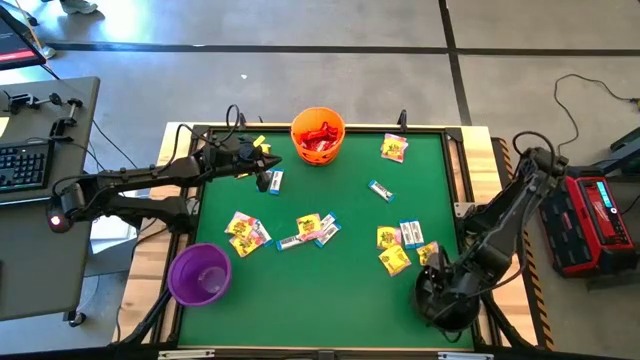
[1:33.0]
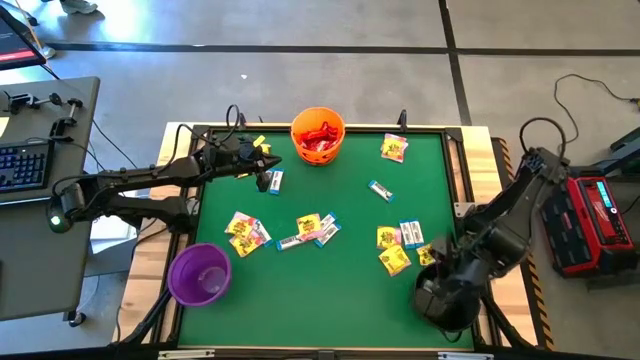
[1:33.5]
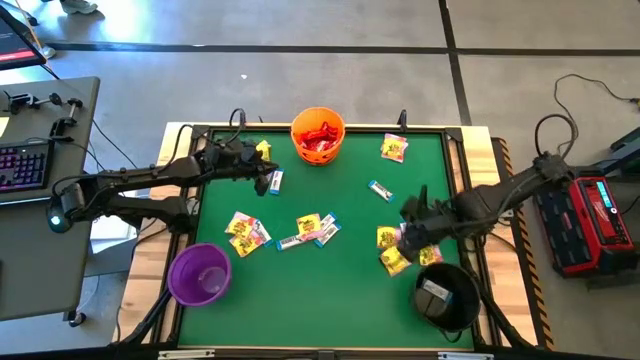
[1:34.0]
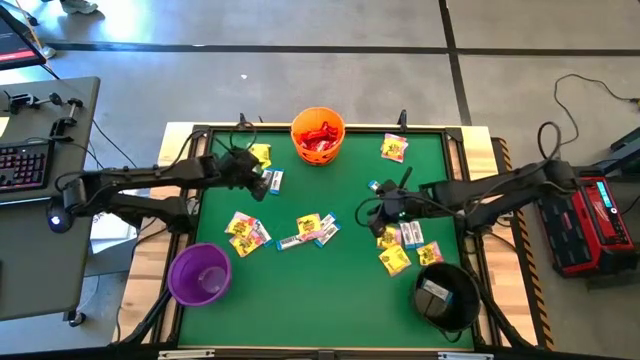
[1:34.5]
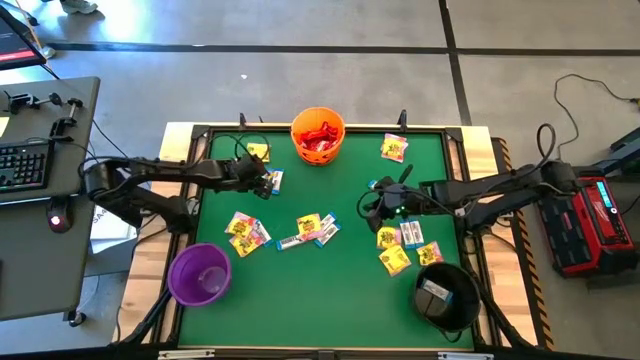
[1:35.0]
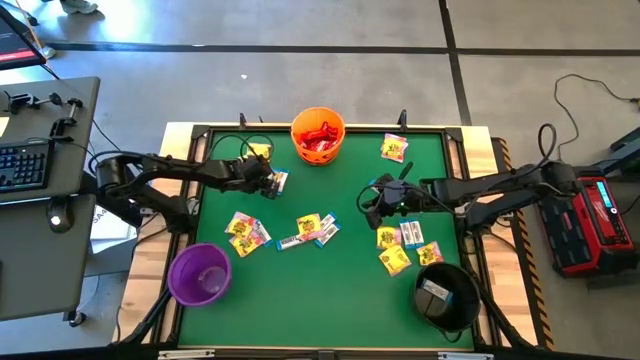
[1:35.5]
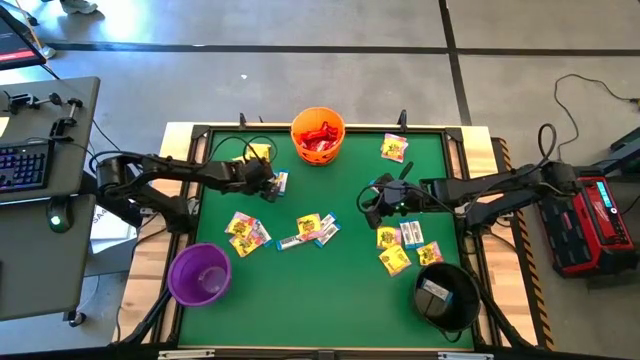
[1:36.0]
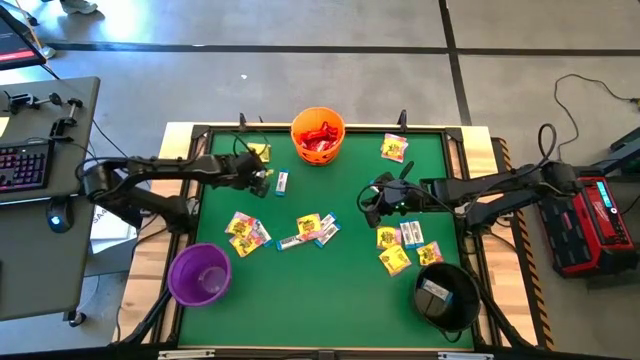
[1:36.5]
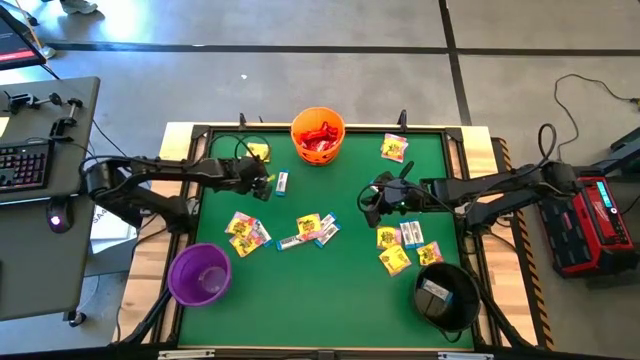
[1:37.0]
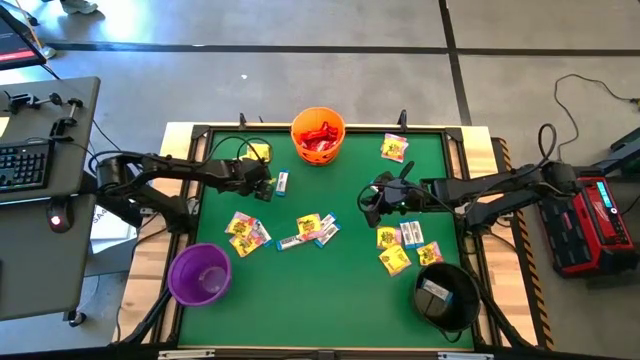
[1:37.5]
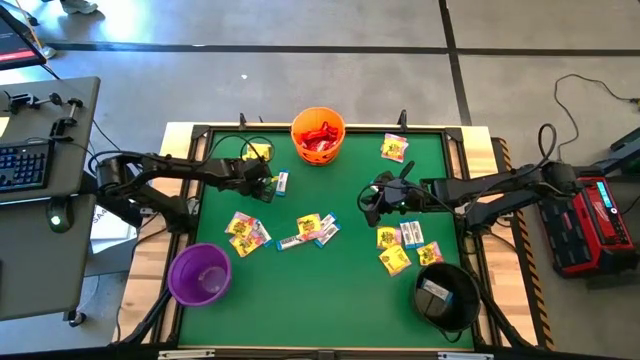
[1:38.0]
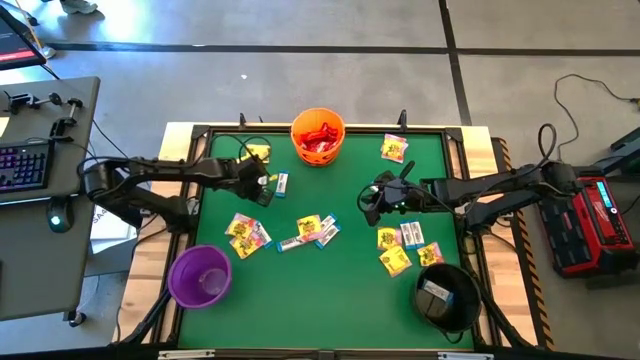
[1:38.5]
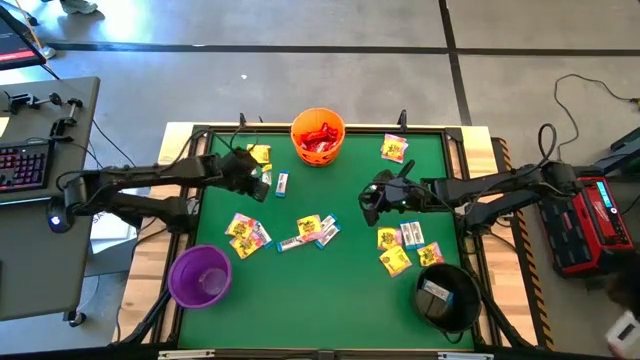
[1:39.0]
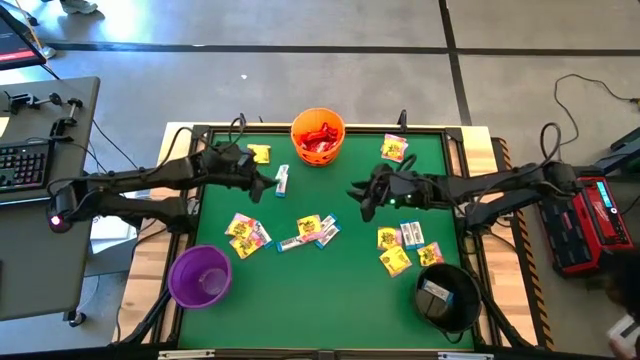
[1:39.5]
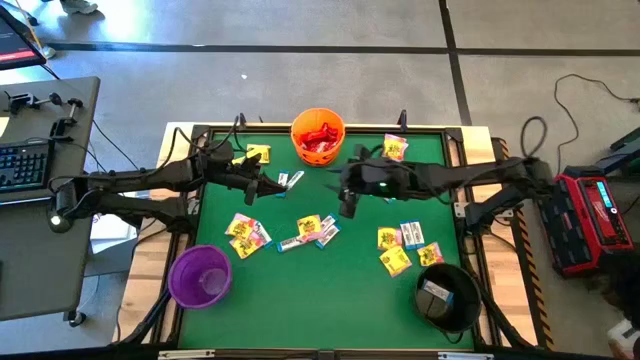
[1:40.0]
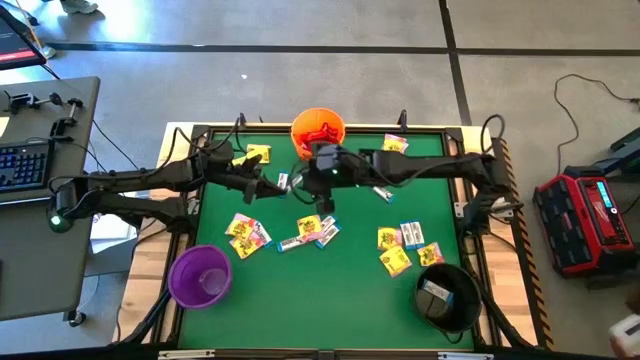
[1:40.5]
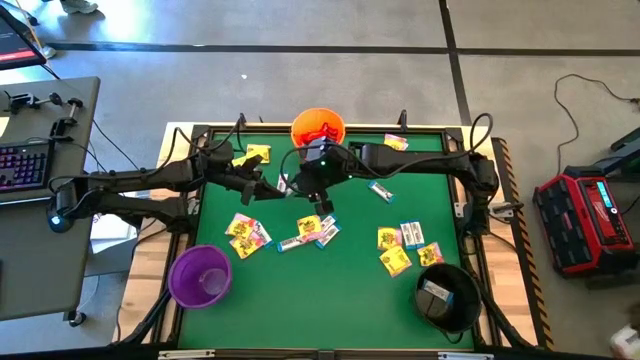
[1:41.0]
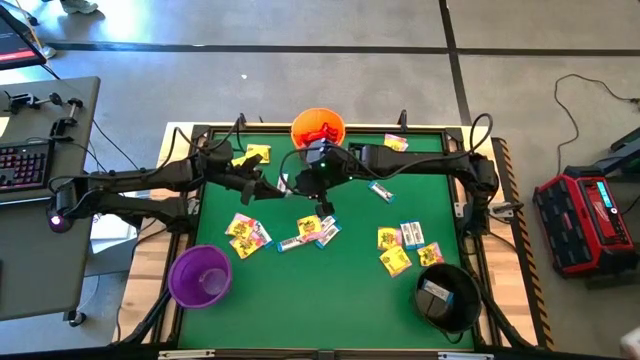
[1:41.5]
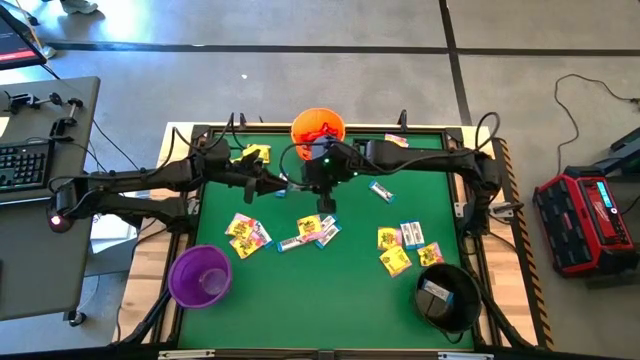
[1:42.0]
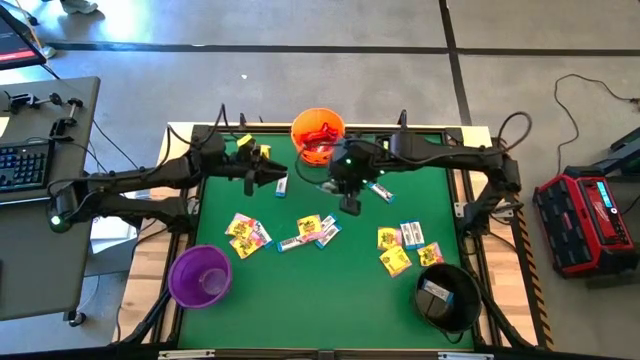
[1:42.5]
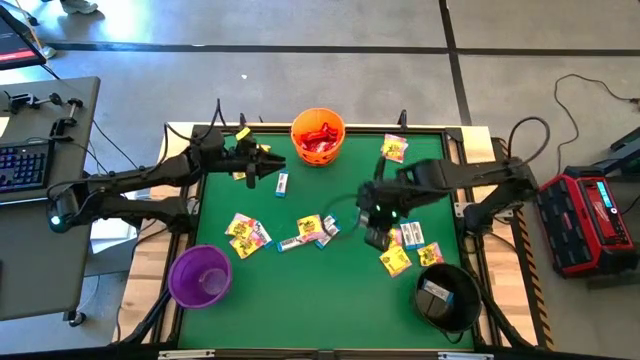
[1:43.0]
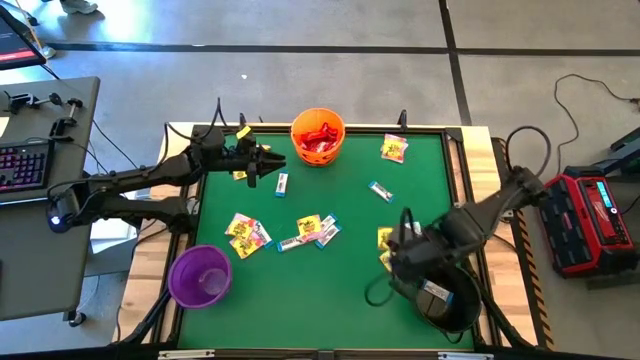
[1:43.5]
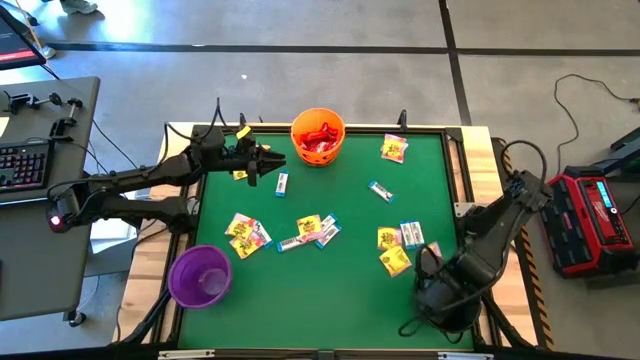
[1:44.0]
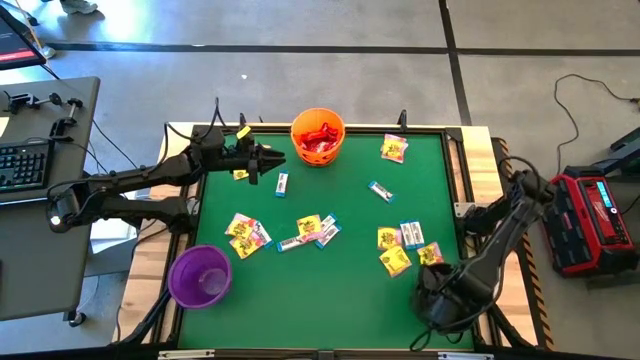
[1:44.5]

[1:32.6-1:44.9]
Task: Sort candy by brand, put in halloween buckets
Put the white chocolate bar into the black bucket

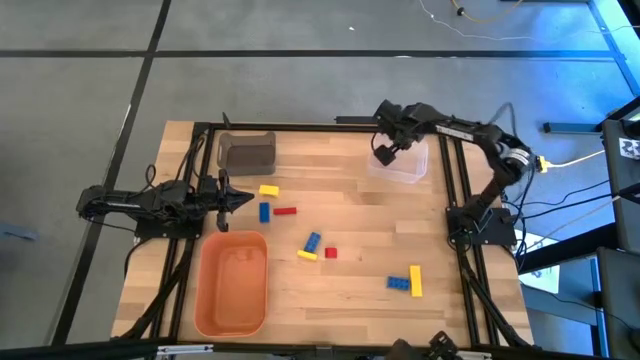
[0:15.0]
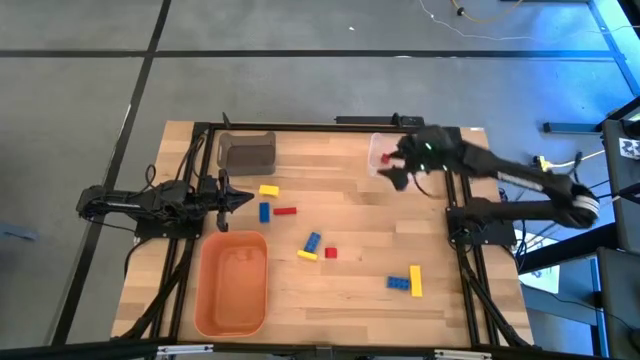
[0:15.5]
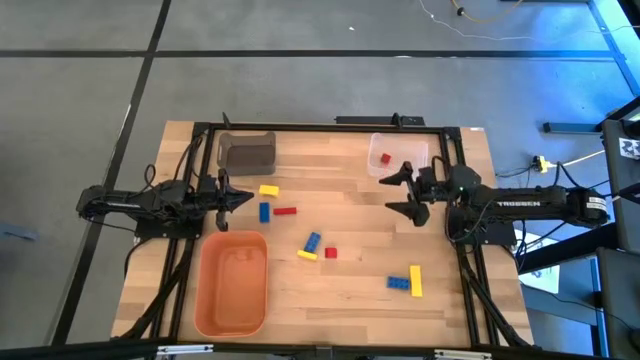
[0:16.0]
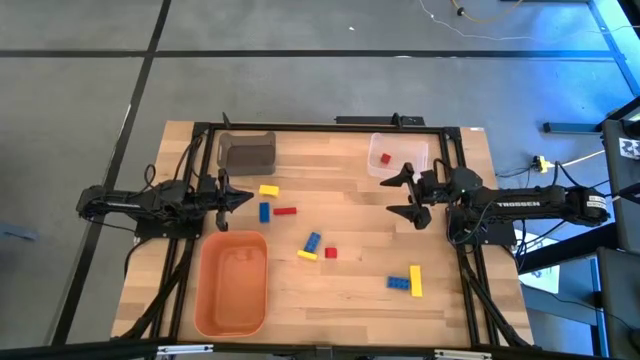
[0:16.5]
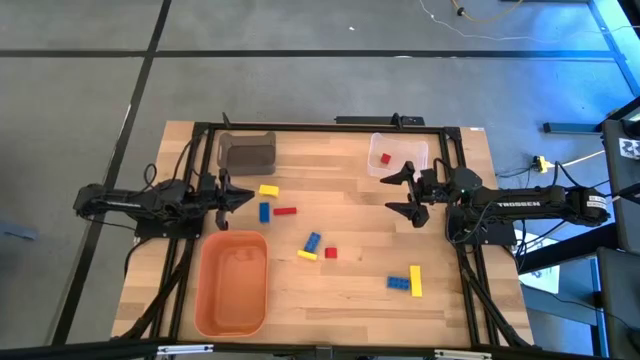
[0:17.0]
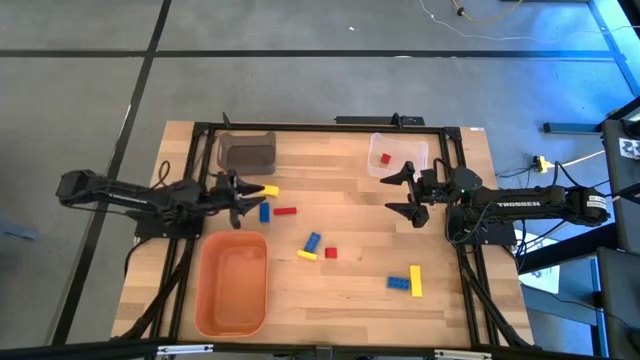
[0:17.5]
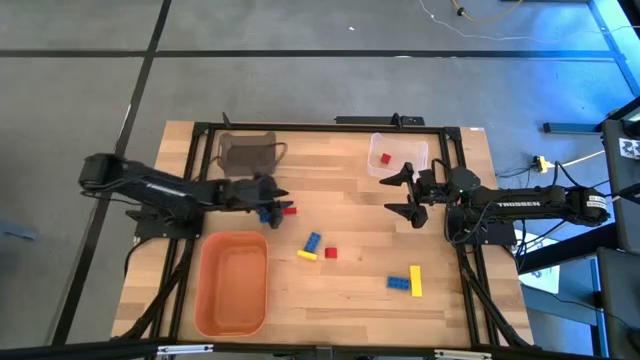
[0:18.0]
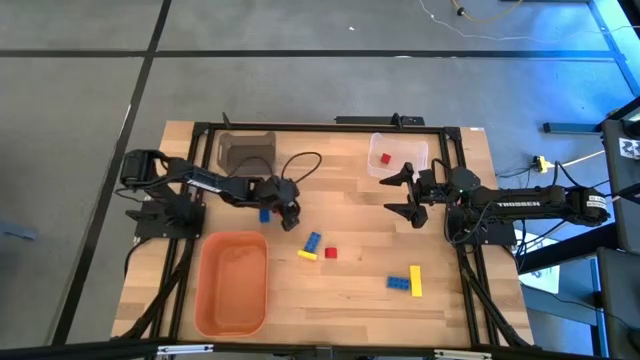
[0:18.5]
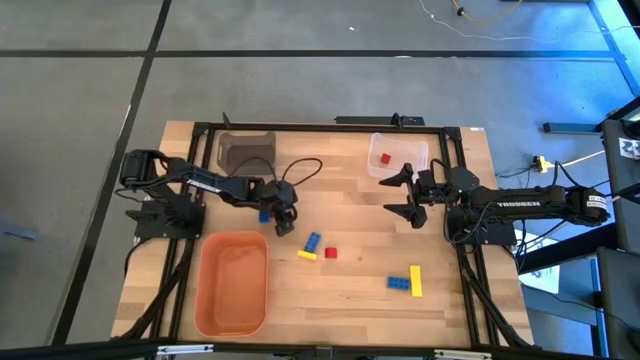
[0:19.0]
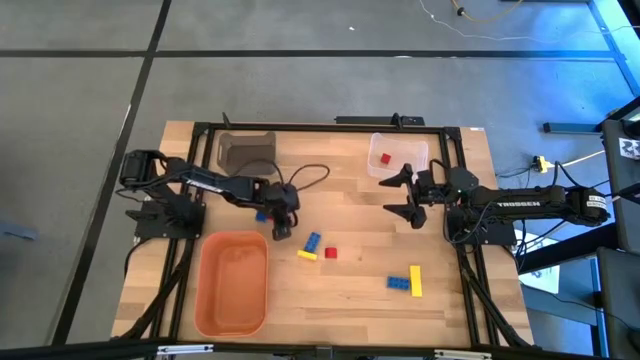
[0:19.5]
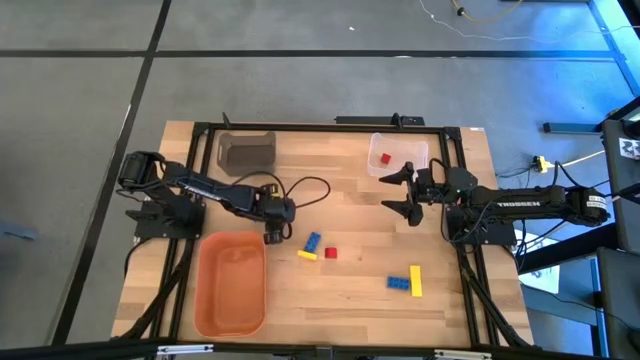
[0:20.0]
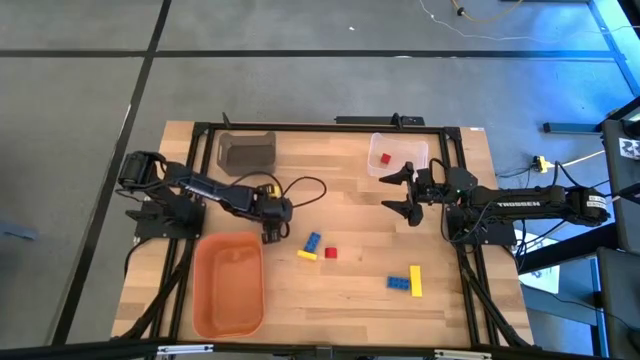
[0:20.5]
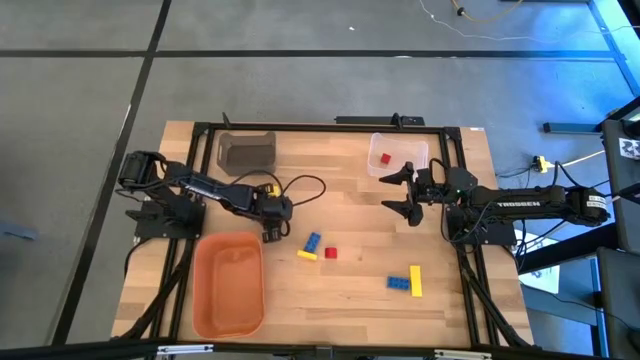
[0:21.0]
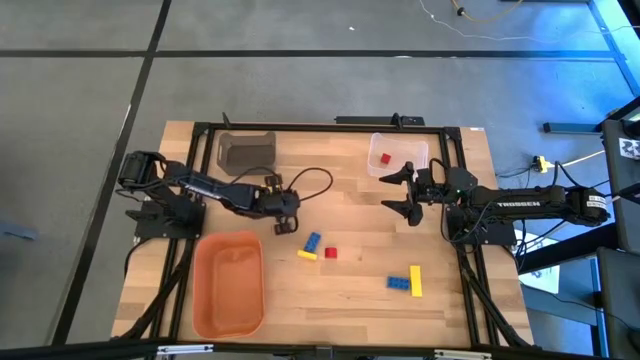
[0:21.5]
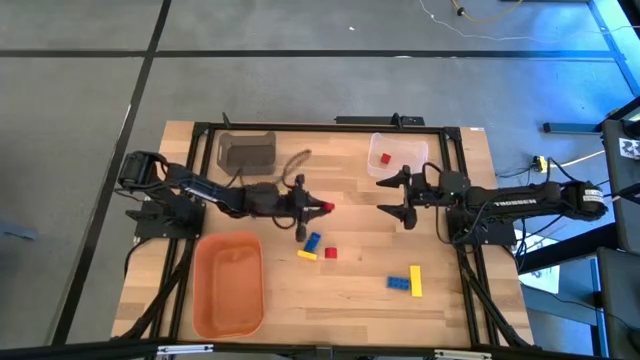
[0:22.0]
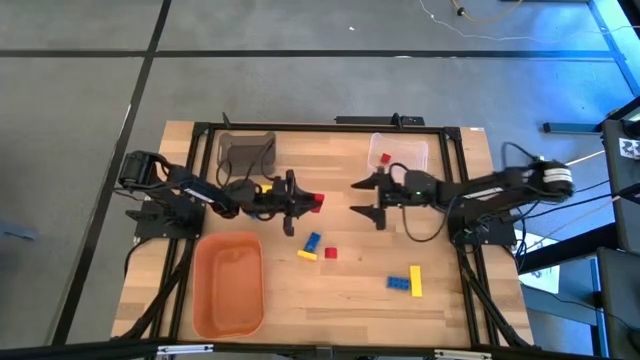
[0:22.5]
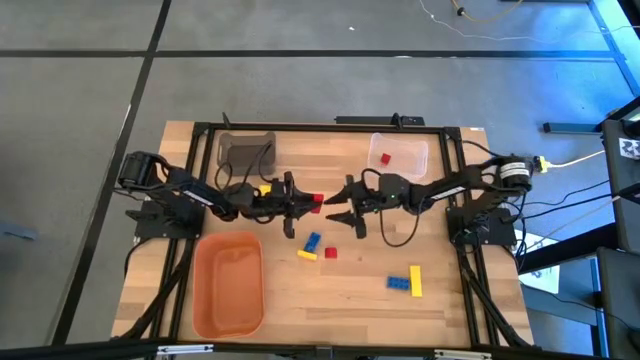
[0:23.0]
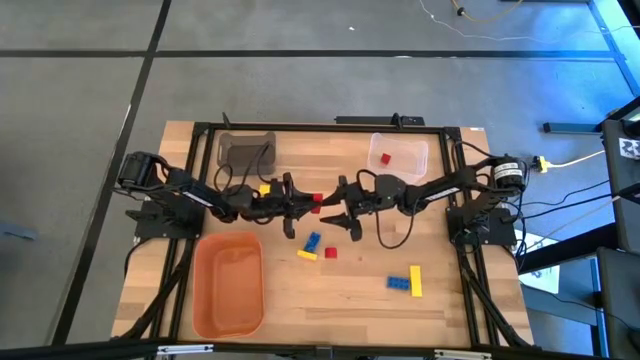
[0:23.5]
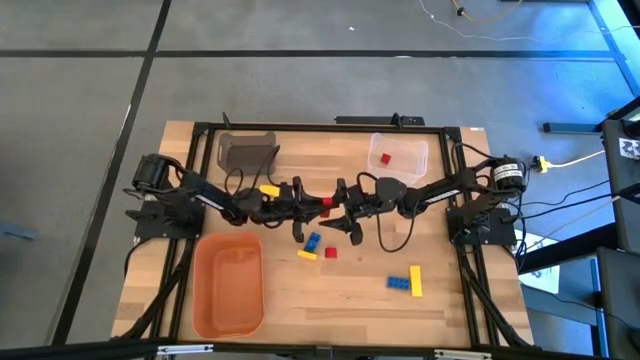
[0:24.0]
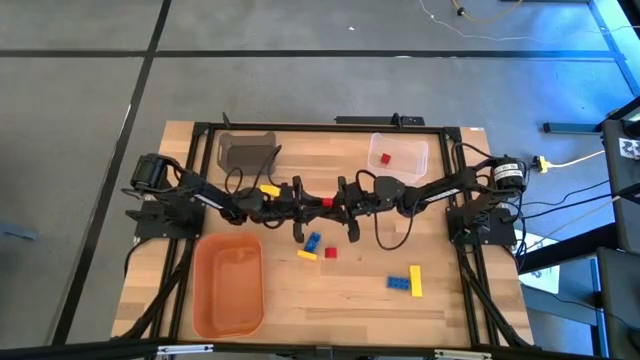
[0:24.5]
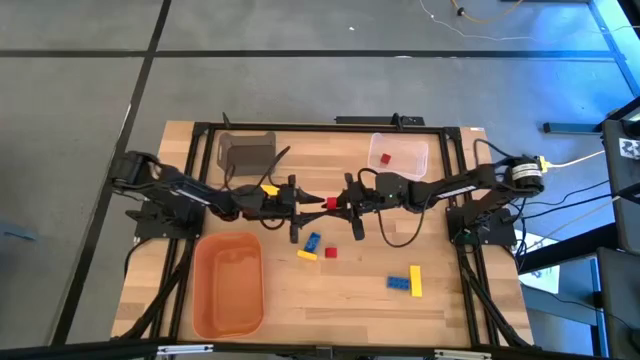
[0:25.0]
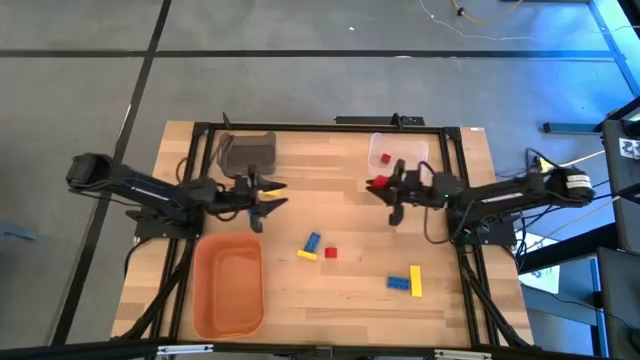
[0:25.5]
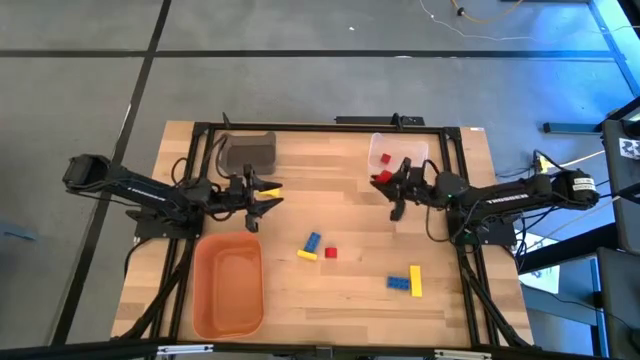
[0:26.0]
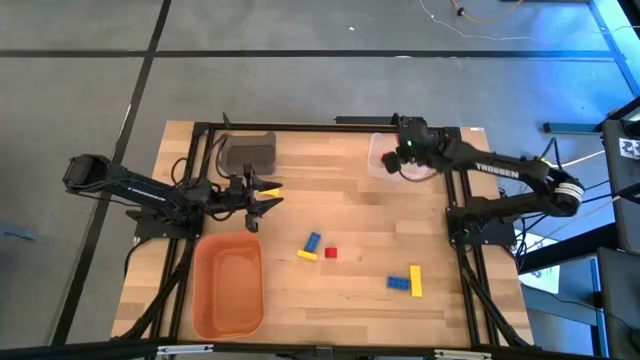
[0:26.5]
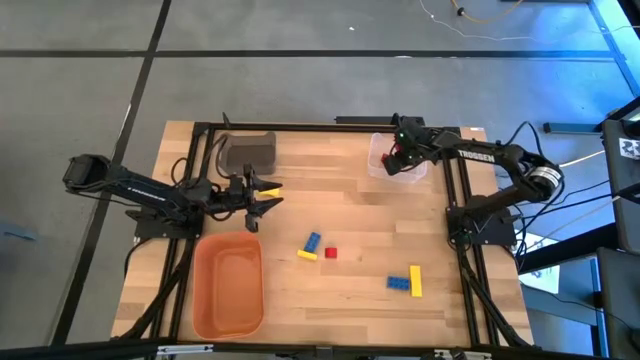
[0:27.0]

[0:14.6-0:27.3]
Task: Sort & place blocks by color
Put the top red block into the transparent white bin
